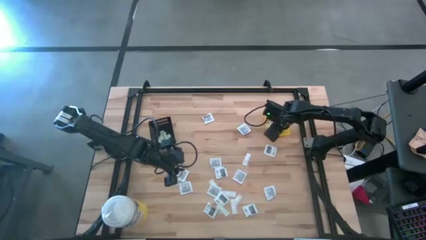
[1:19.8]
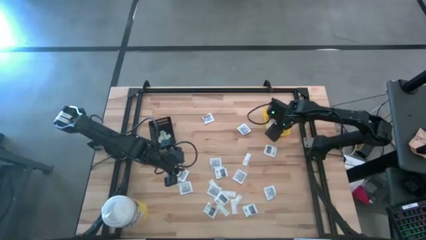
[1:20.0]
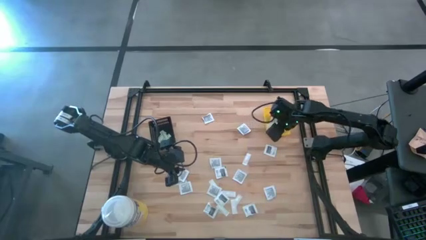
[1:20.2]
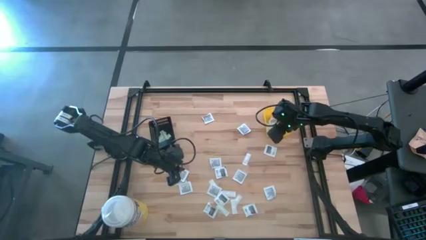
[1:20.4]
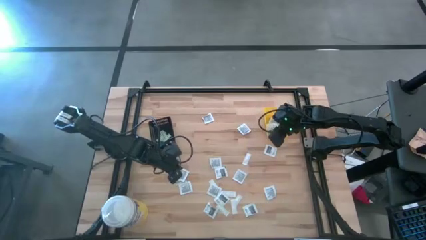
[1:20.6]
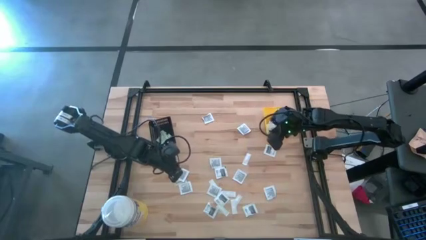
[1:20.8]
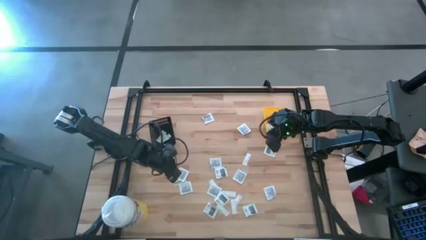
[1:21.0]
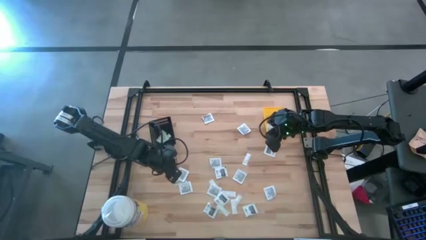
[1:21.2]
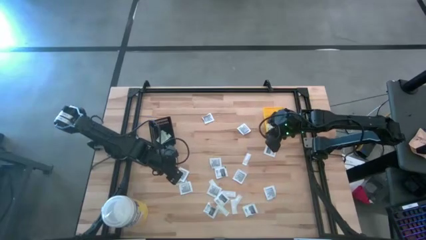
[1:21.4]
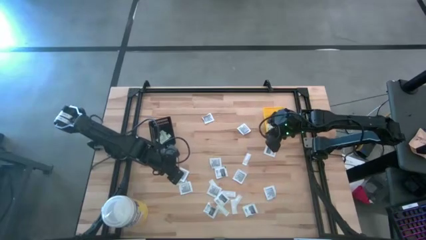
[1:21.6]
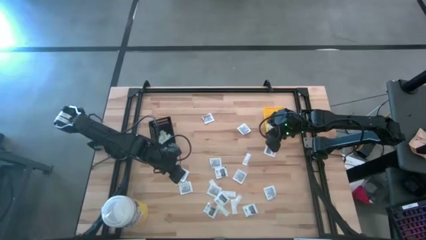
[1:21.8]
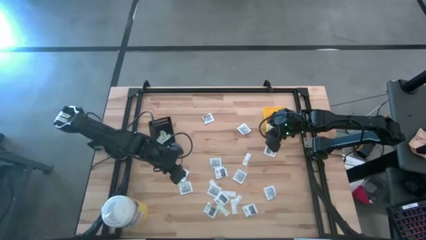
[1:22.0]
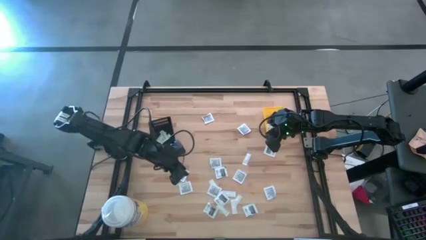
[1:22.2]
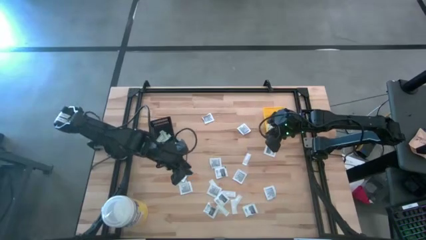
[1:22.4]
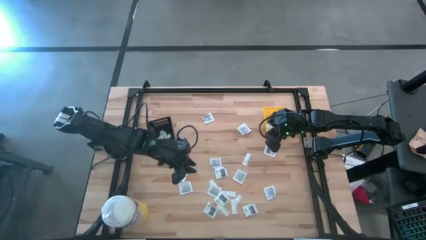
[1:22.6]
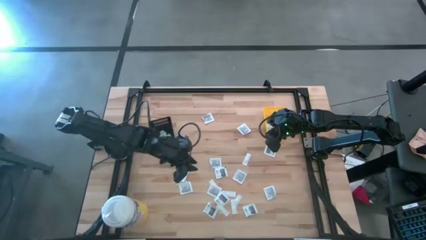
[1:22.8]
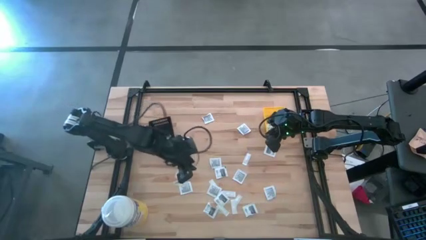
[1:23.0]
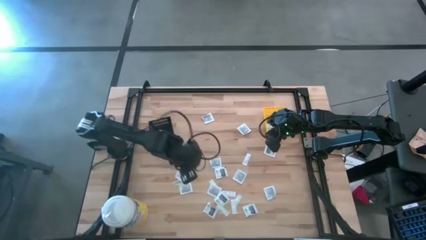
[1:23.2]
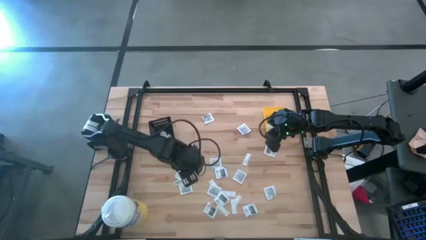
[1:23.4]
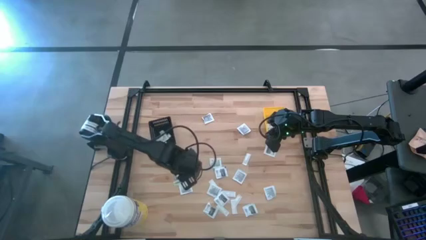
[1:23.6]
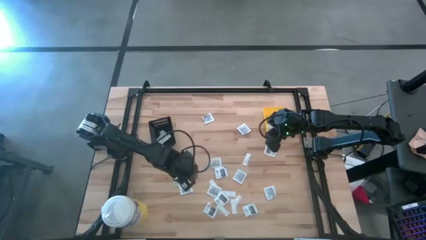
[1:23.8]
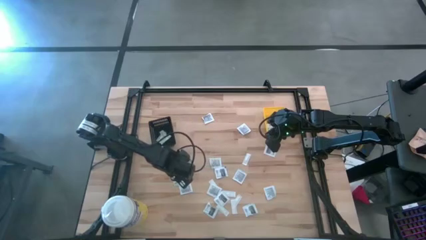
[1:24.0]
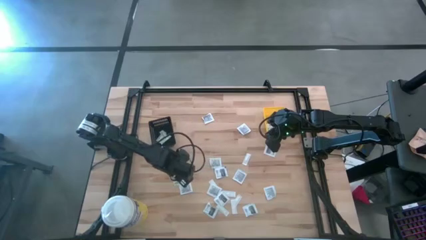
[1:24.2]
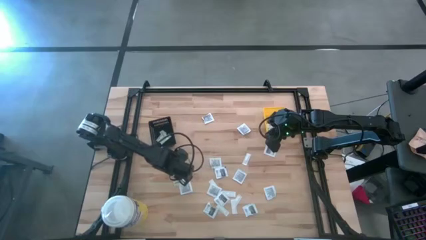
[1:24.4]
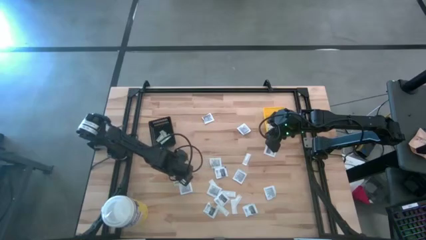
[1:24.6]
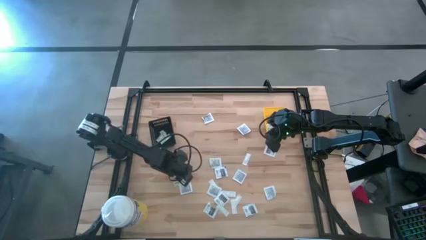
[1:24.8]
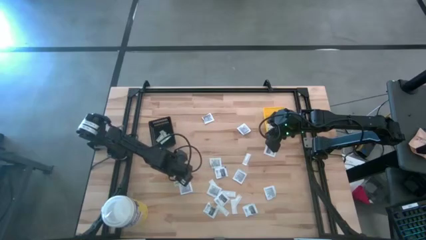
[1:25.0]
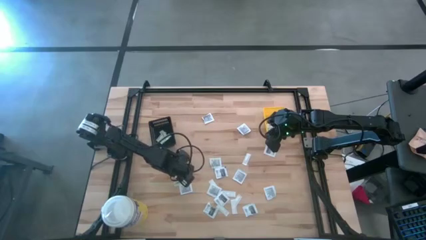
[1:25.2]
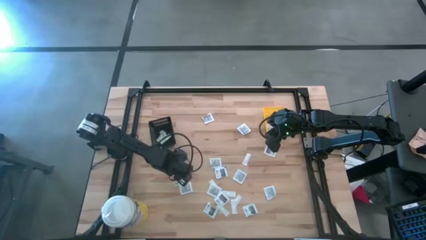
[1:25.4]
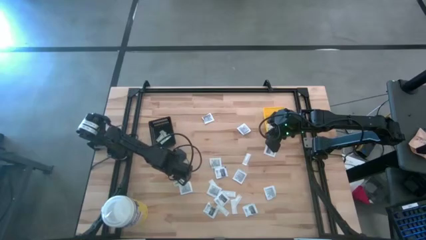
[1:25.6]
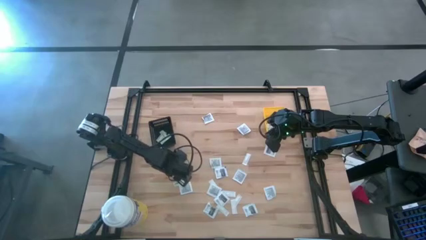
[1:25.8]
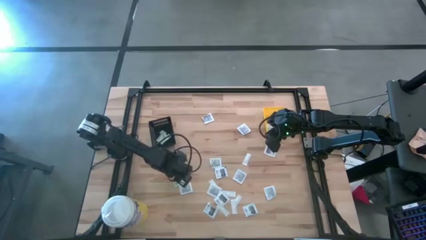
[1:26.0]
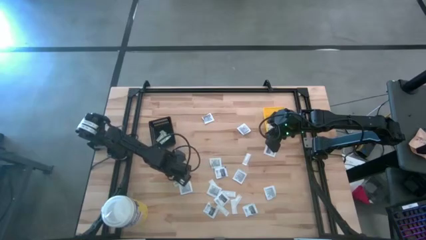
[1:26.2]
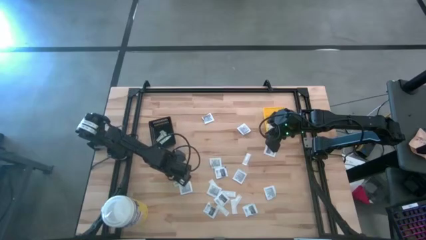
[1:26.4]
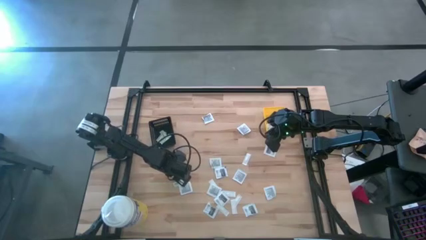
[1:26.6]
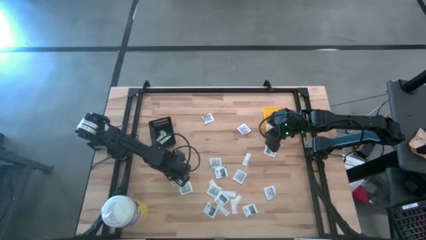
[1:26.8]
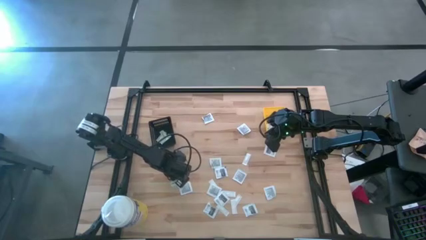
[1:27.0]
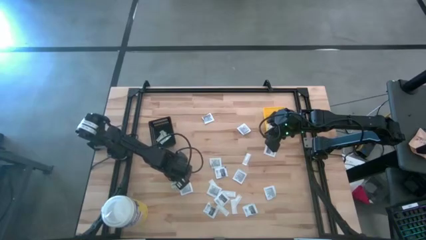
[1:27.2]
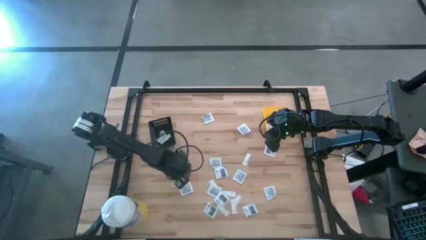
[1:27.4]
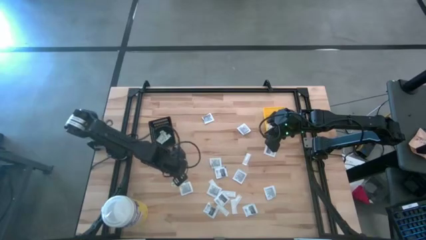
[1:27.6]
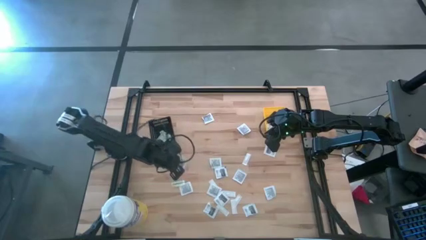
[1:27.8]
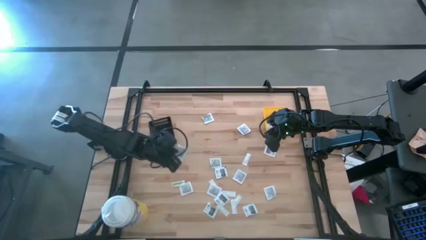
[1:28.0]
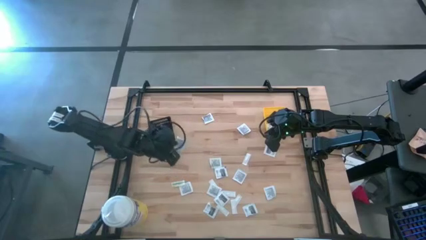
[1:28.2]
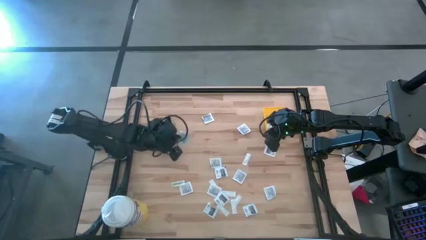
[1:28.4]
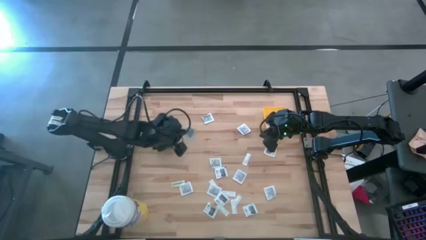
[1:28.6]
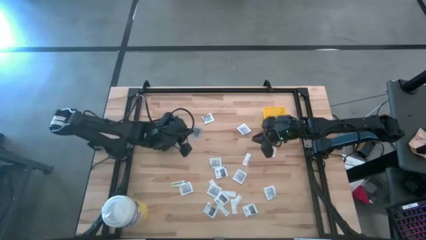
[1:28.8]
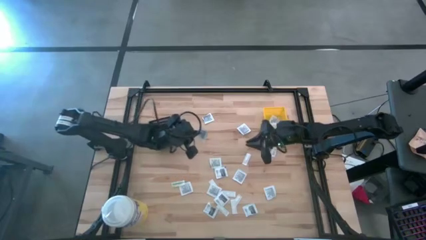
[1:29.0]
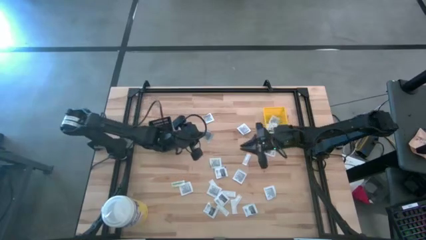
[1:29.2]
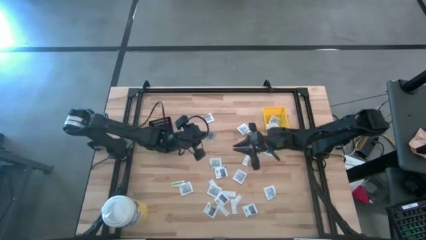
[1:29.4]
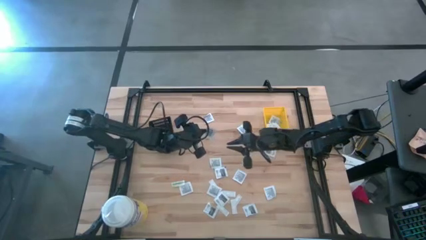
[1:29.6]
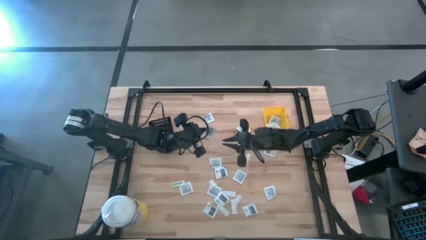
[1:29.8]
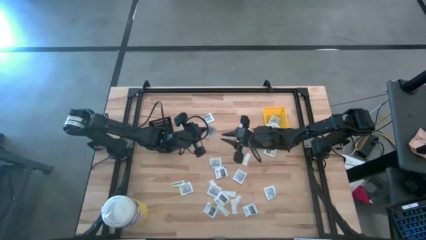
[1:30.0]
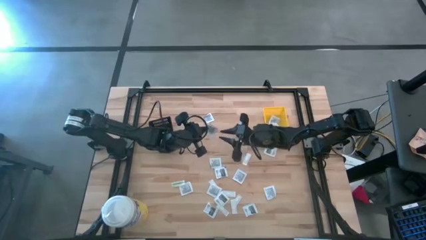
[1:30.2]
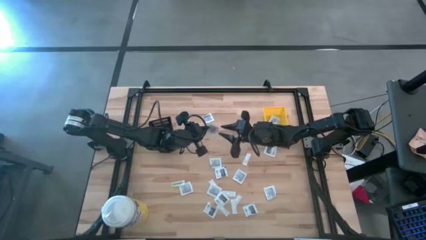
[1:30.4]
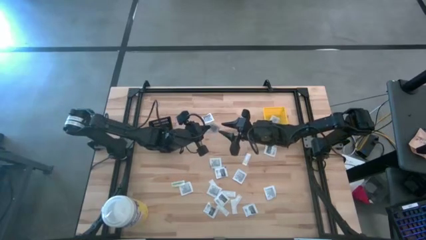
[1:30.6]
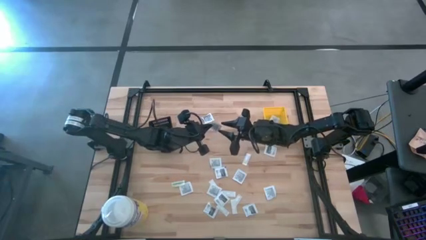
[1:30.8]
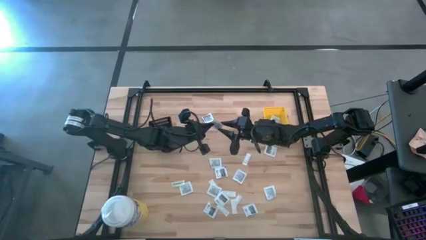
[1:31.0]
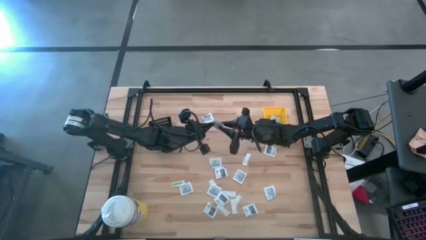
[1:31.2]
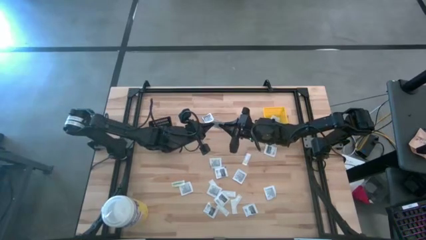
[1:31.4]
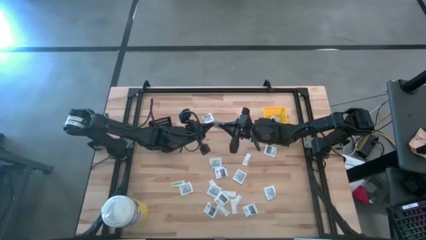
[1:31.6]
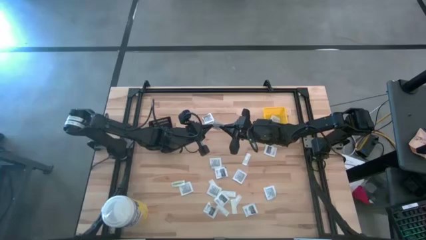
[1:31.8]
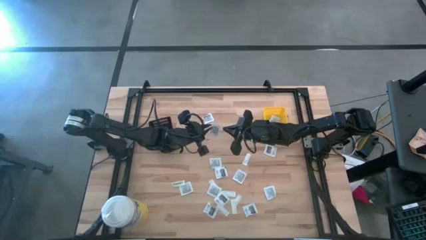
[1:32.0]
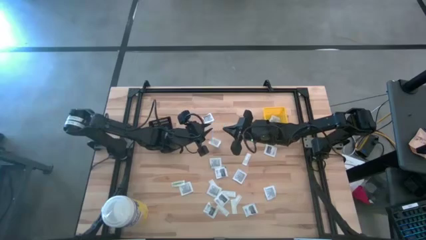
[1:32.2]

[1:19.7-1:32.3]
Task: Pick & Place First Aid Supplies
Put the black pad into the yellow bin

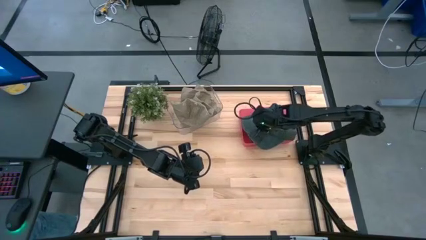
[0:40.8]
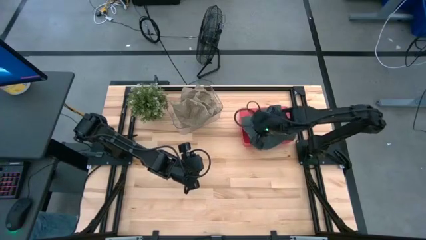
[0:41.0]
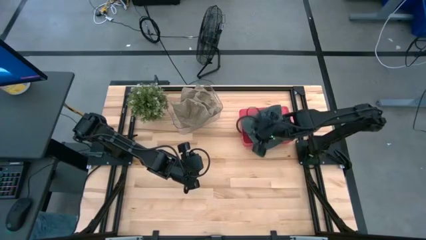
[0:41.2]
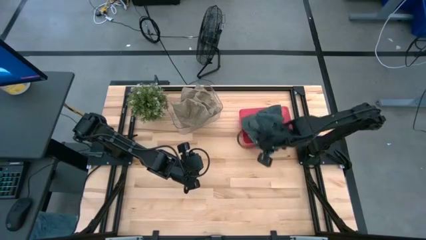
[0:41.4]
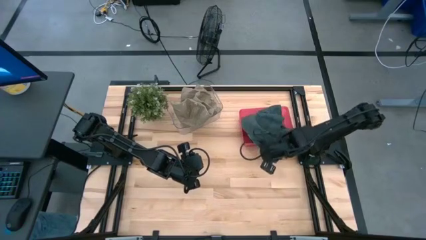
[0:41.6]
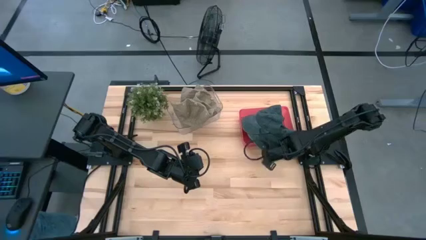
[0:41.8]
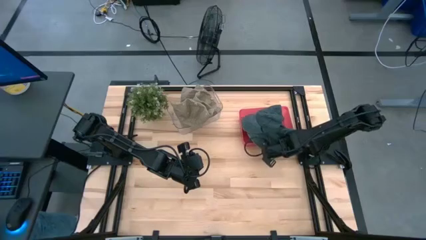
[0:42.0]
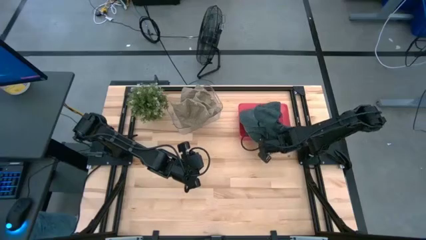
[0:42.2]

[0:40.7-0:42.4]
Task: Pick & Place hat
Adjust the black caps in the red bin
